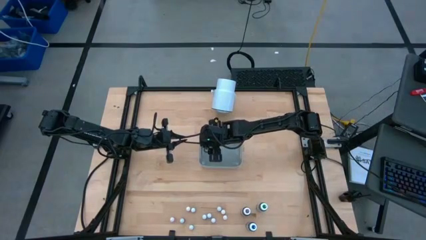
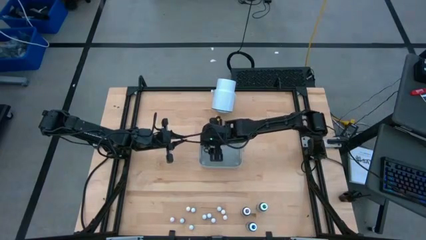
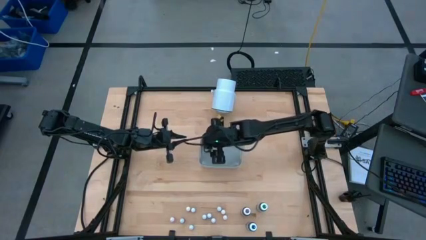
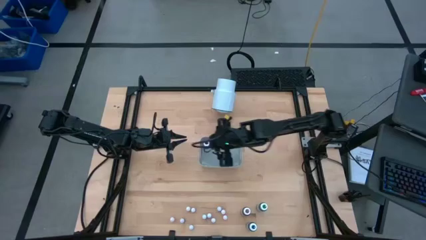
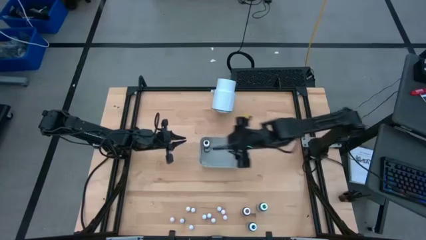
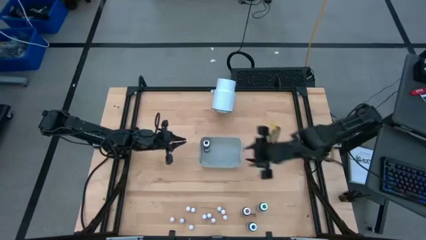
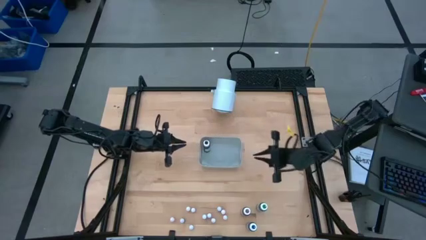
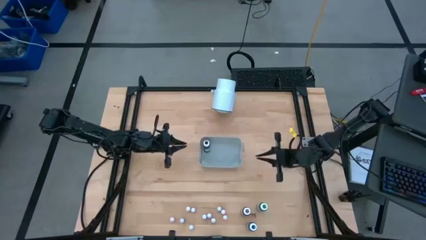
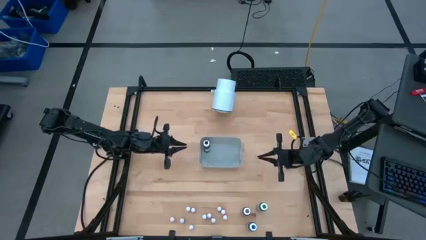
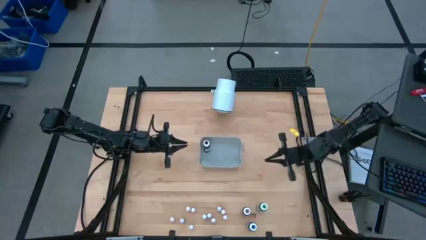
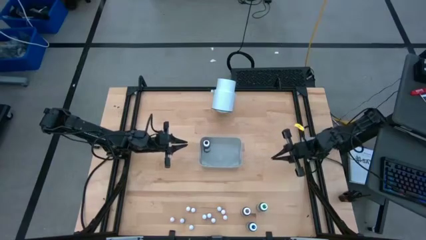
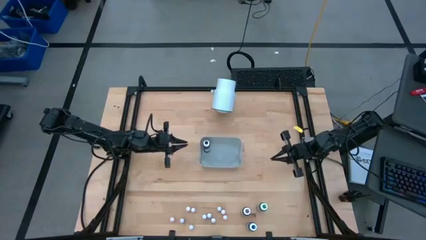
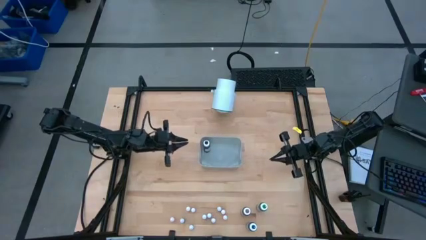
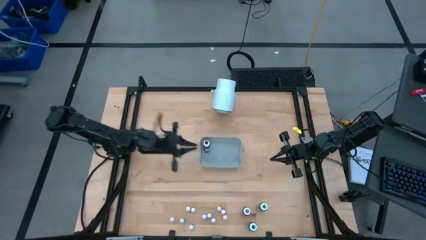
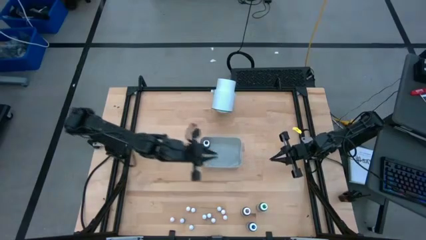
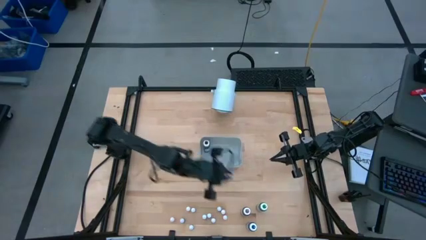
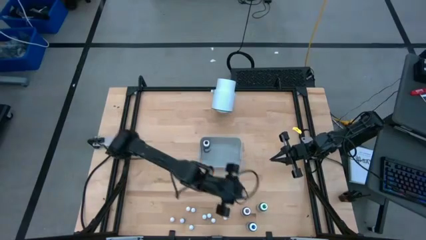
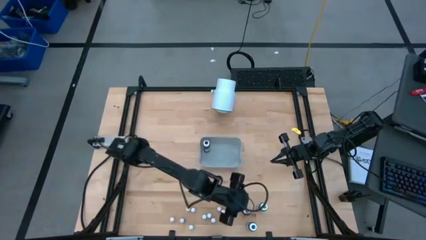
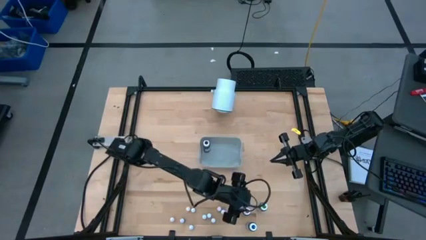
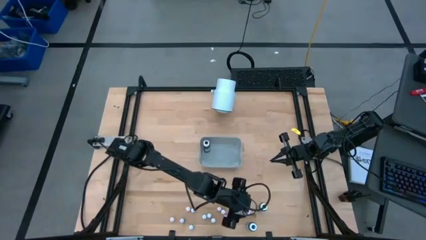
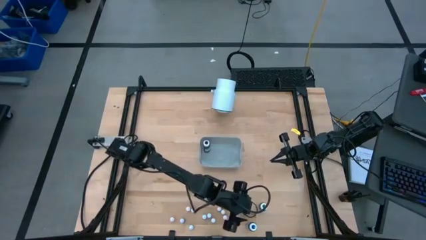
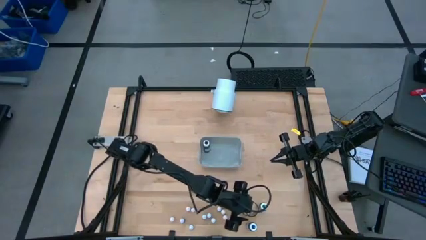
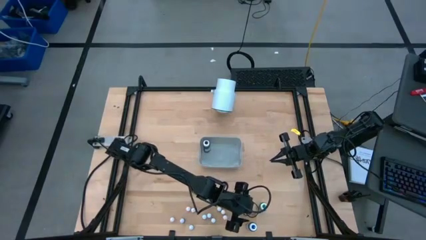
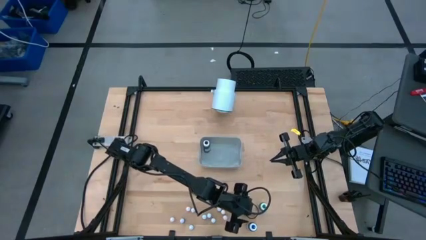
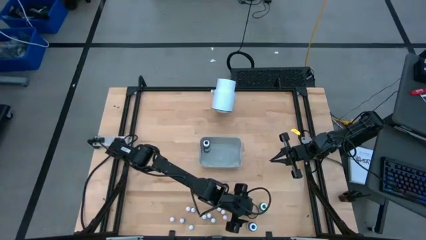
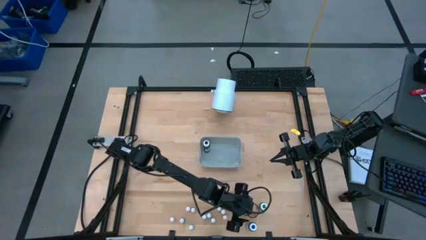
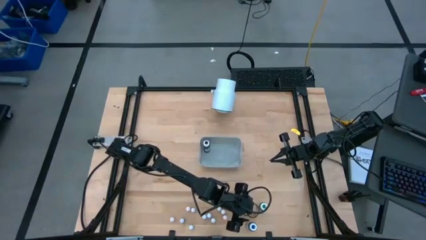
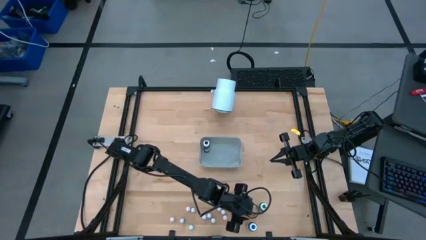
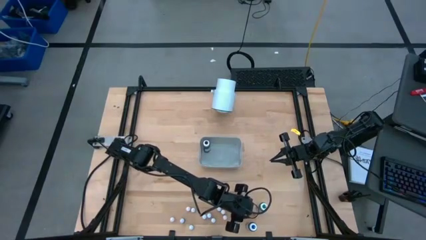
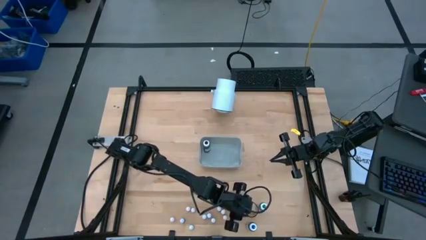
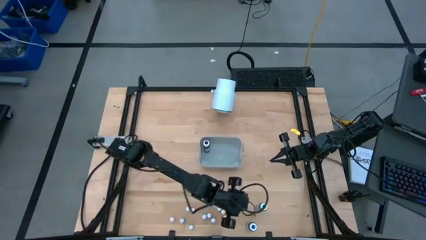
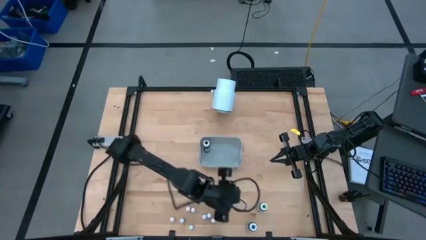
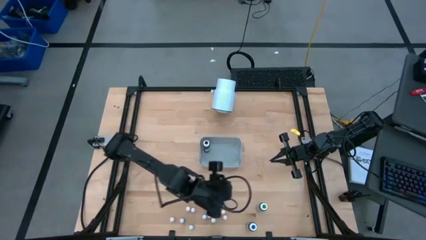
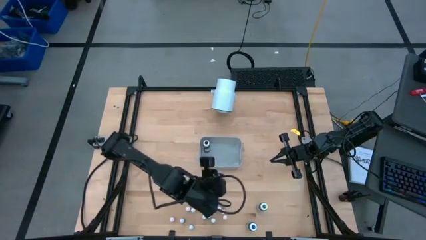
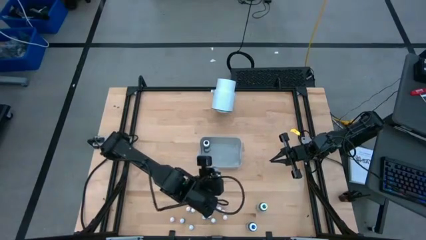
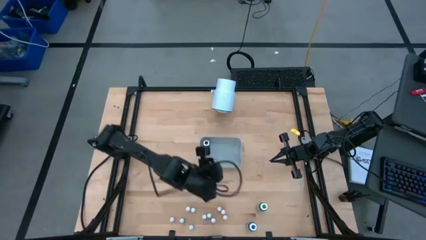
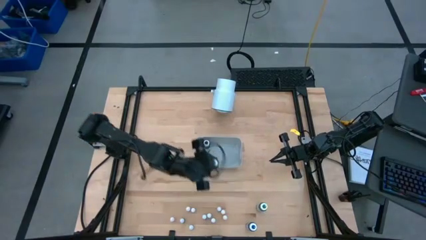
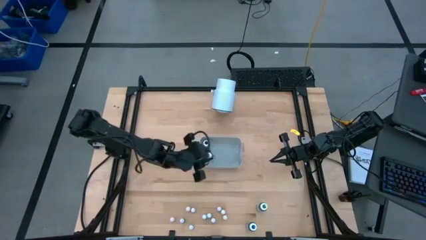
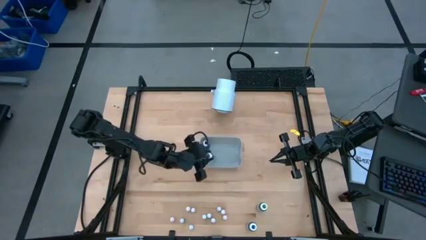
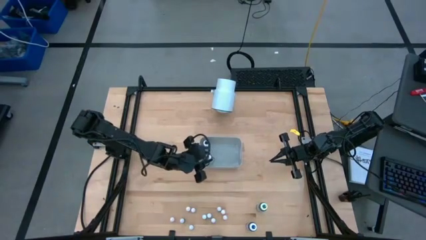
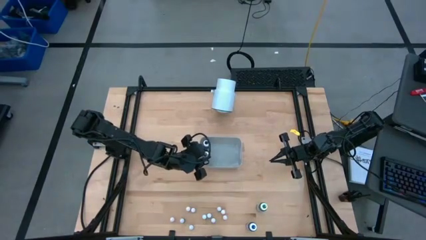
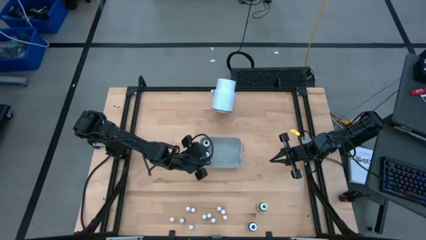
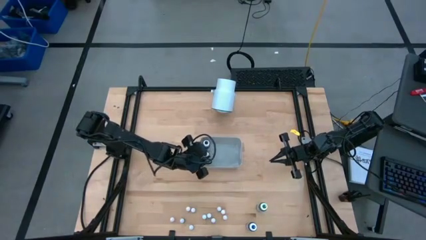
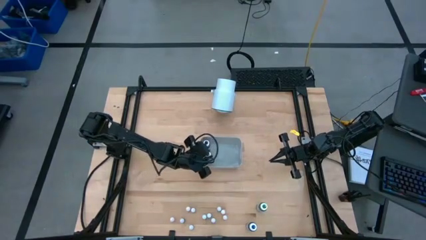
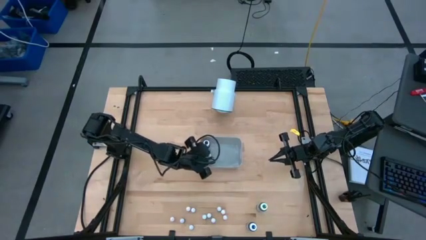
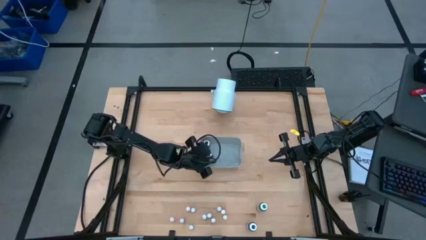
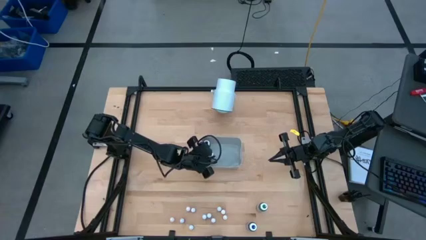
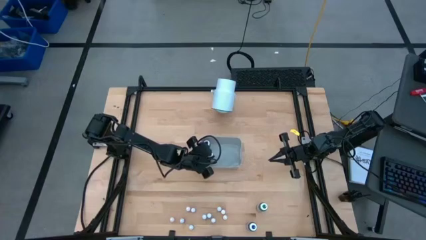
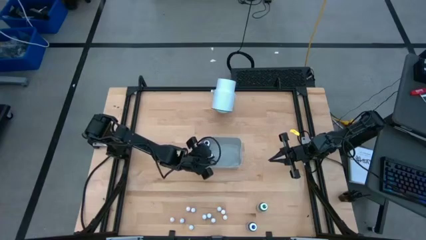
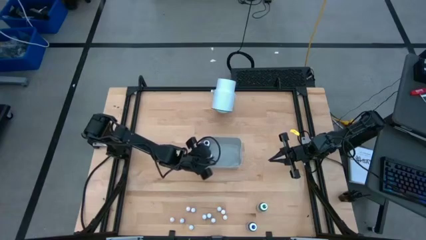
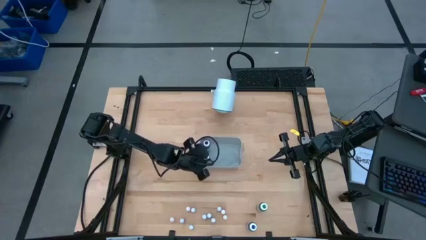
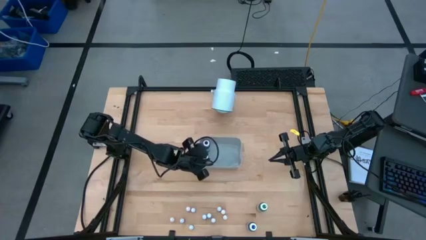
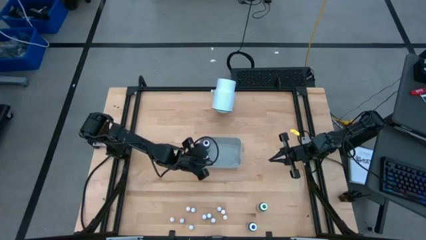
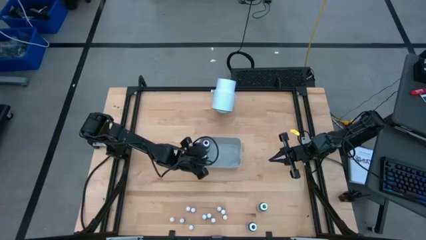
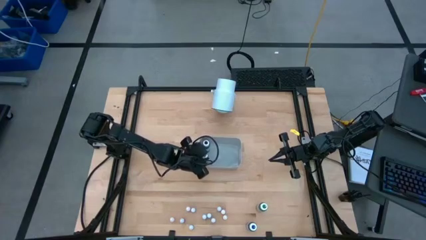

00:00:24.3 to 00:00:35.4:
Task: Pick & Place food coloring
Put the large violet food coloring bottle into the gray bin

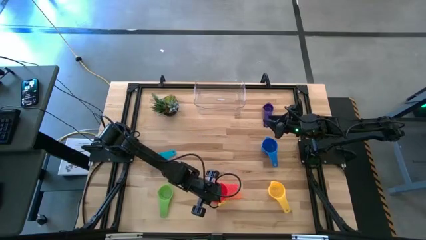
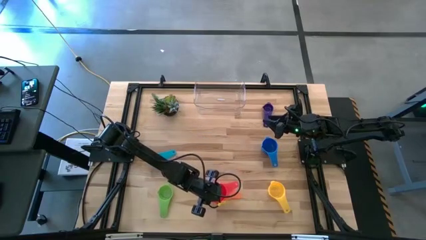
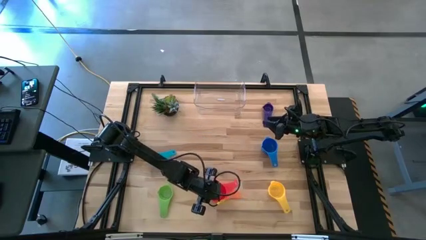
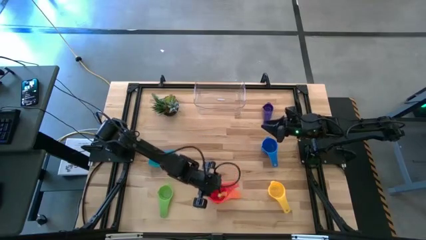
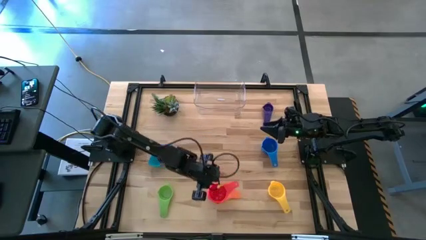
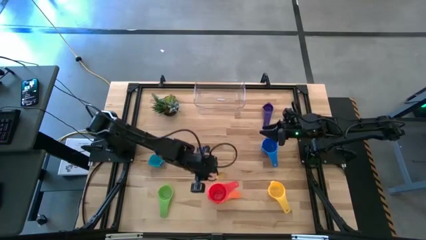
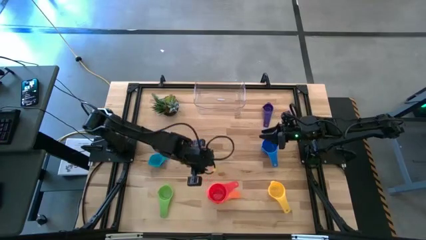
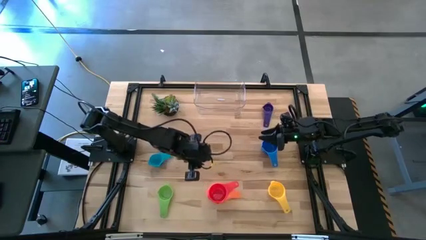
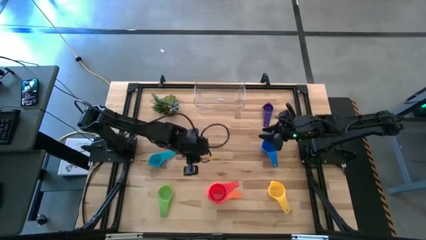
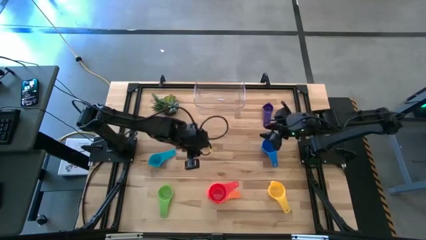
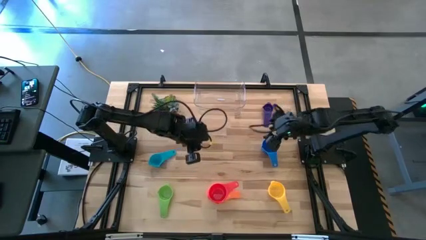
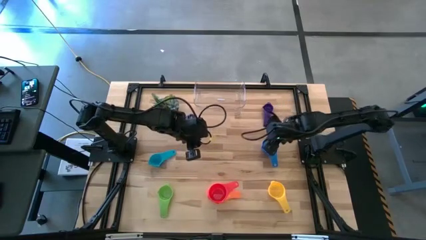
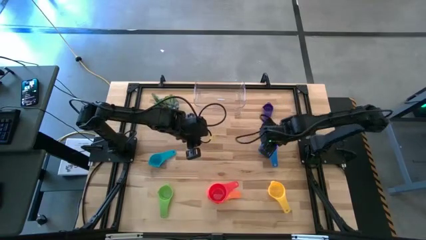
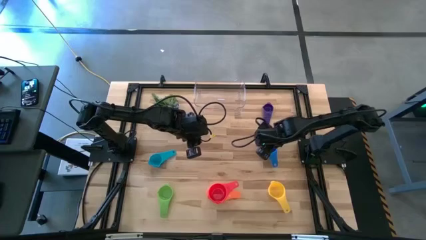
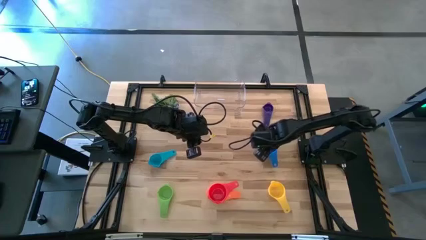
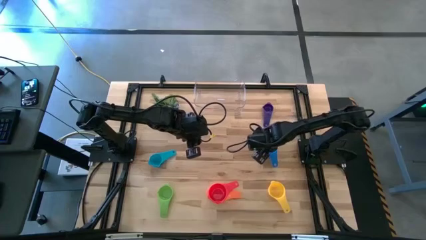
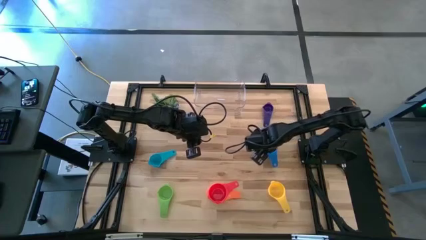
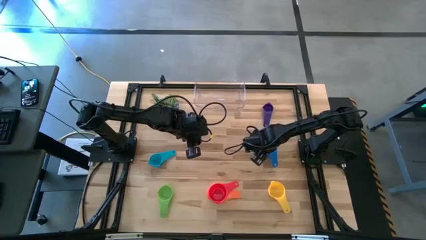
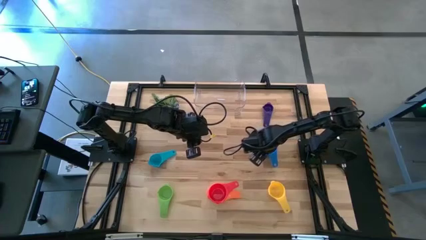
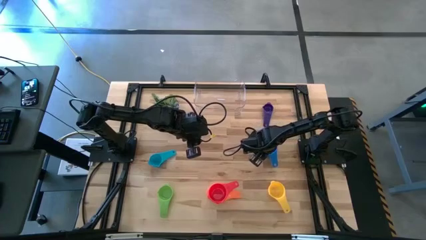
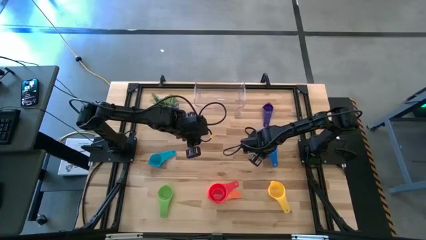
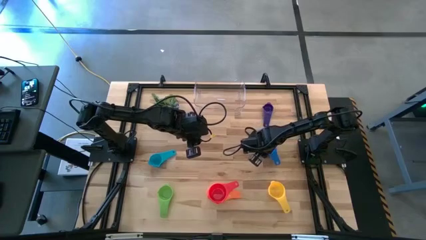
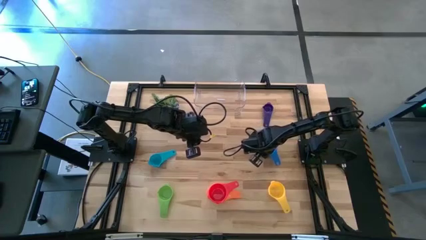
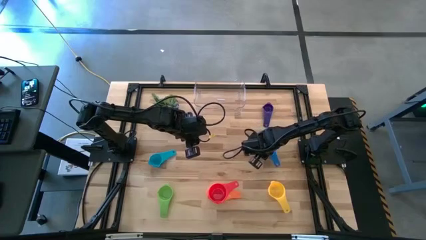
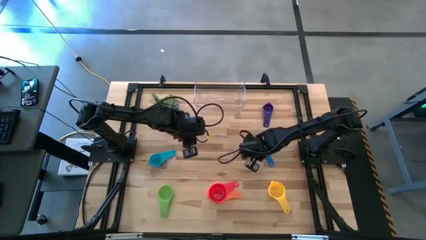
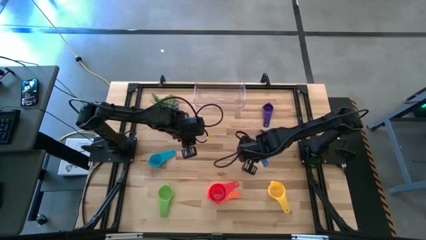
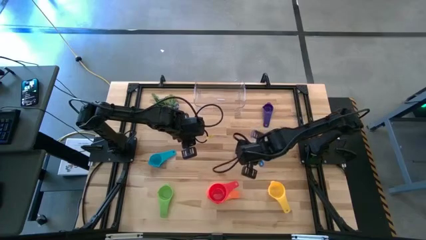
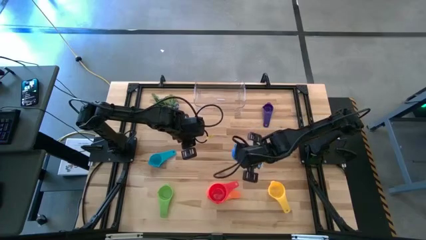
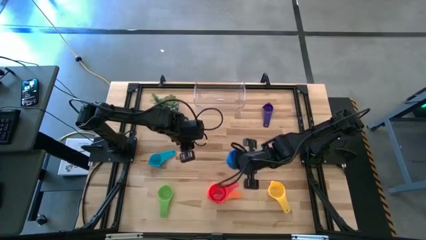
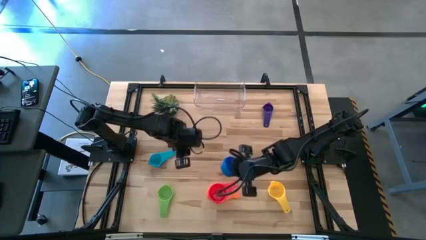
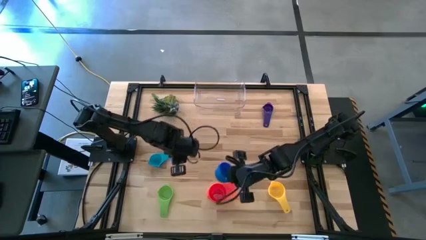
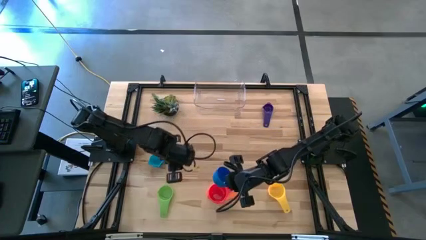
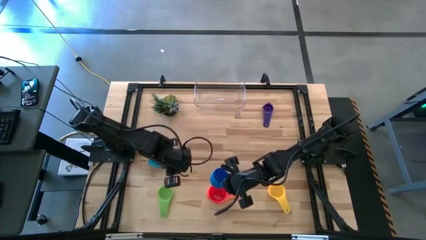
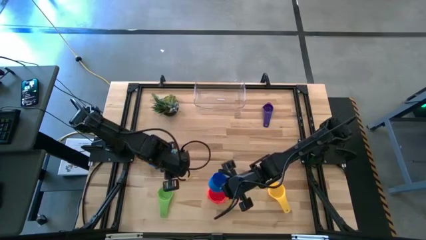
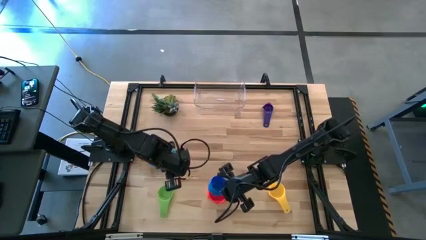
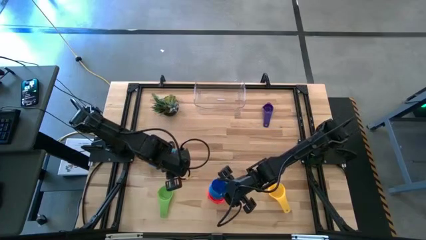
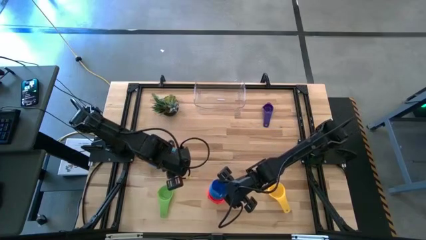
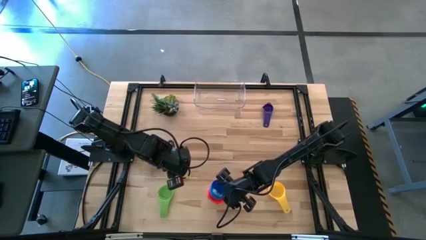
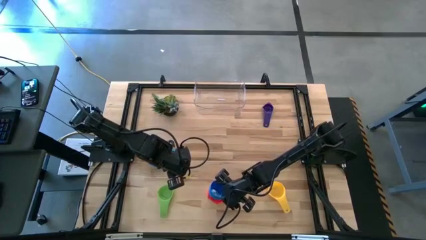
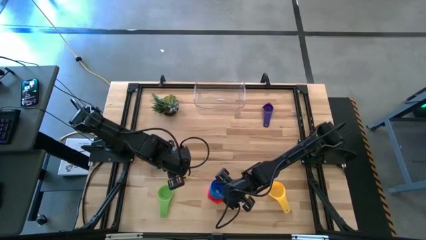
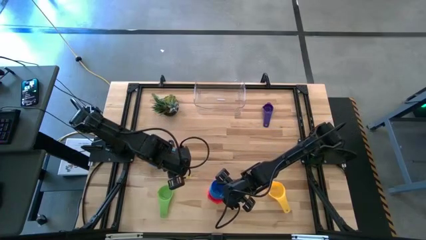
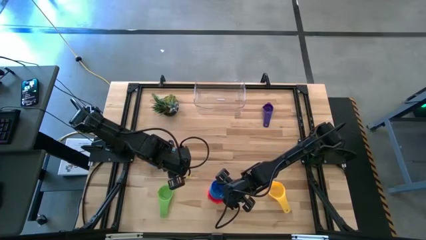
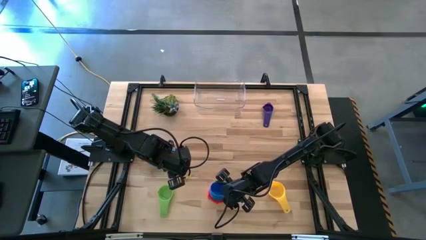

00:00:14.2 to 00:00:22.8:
Task: Nest measuring cups in basket
Stack the blue measuring cup on the red measuring cup
